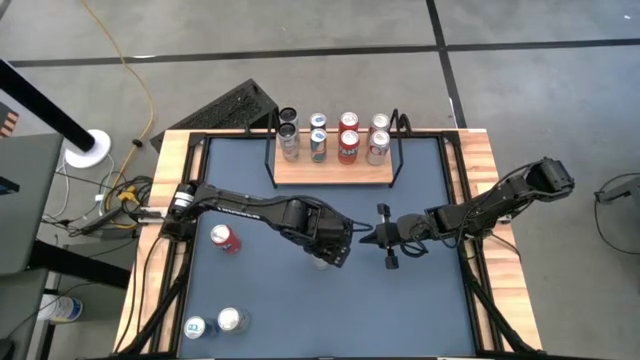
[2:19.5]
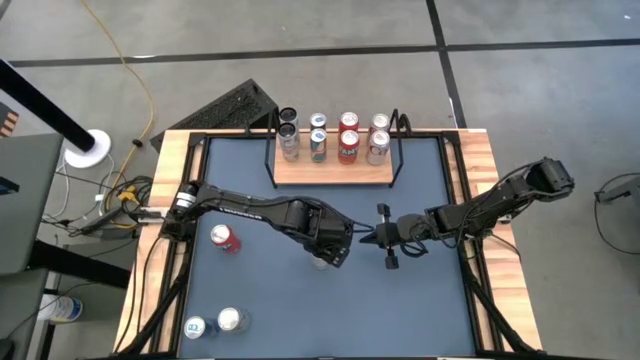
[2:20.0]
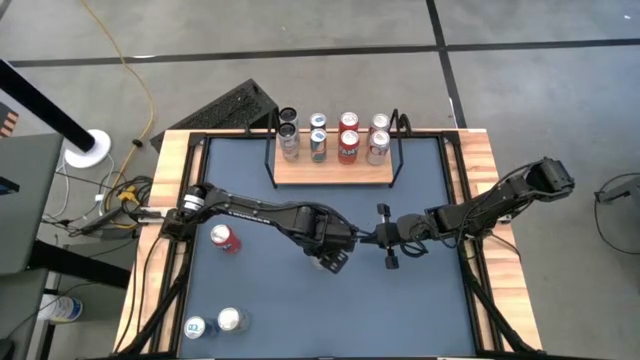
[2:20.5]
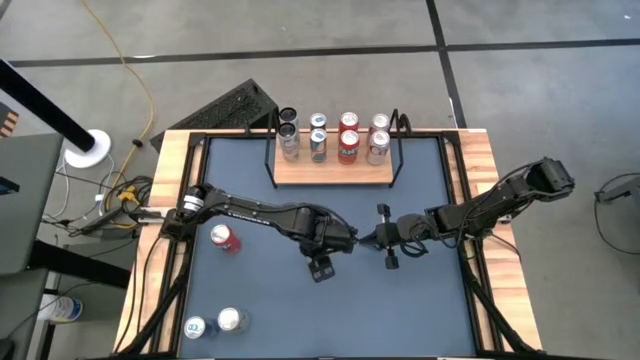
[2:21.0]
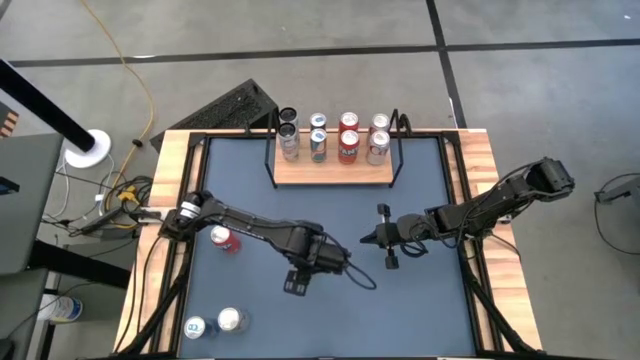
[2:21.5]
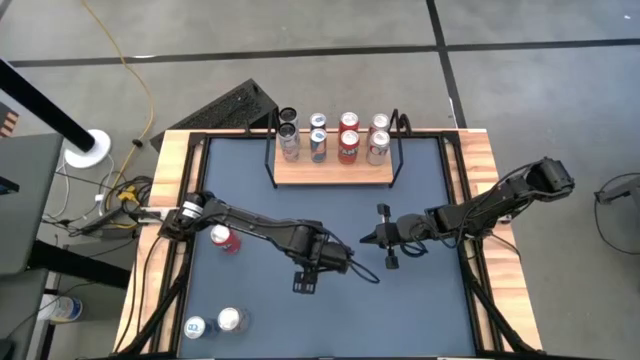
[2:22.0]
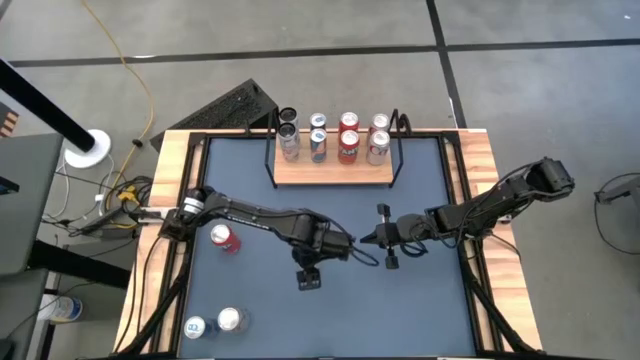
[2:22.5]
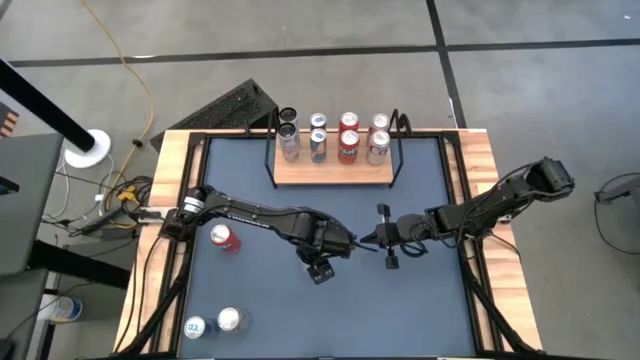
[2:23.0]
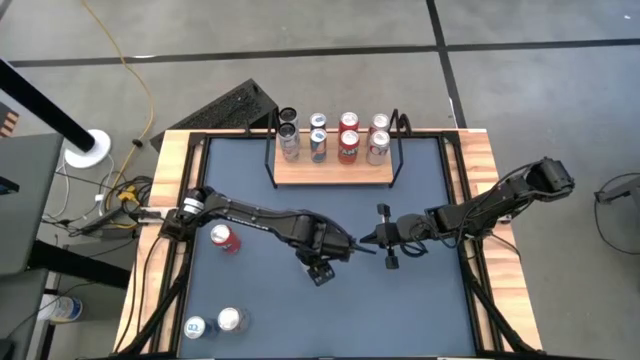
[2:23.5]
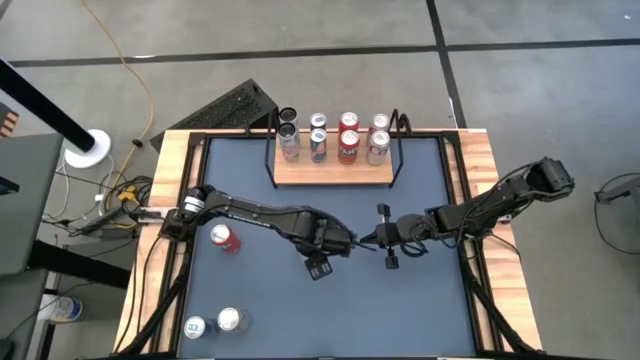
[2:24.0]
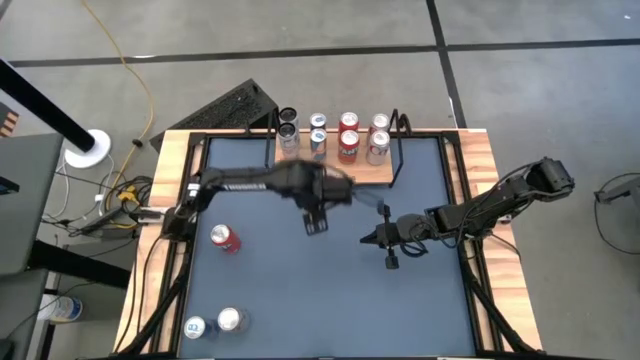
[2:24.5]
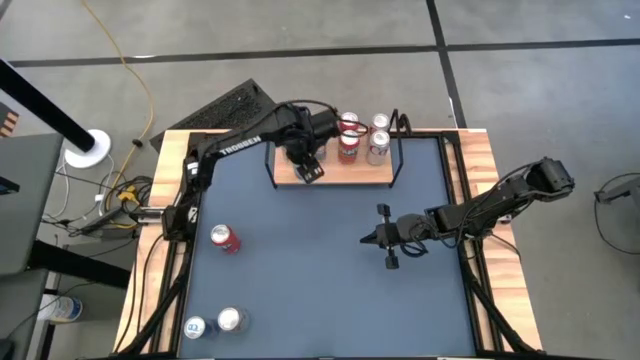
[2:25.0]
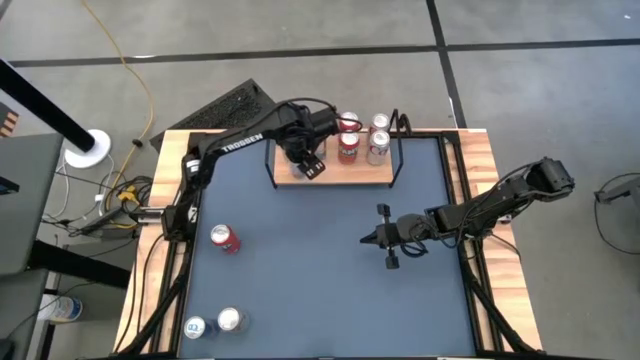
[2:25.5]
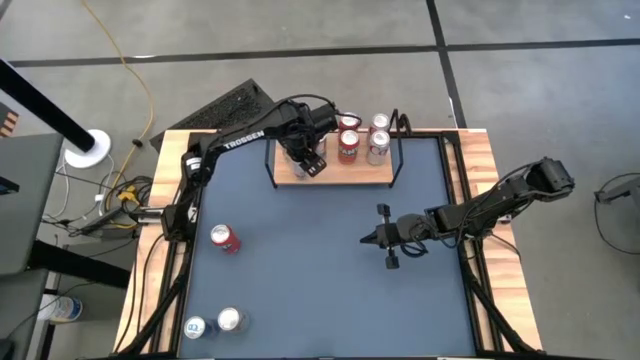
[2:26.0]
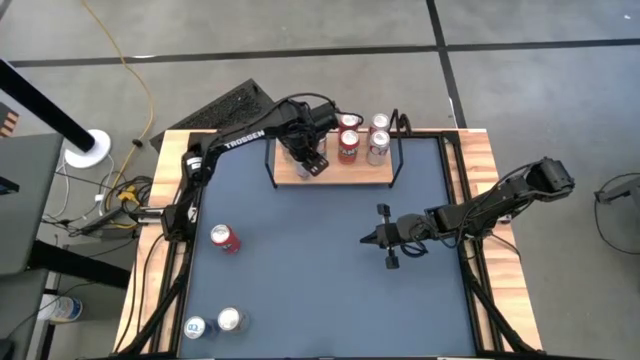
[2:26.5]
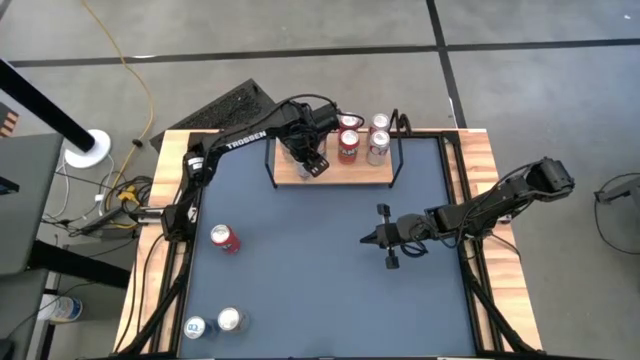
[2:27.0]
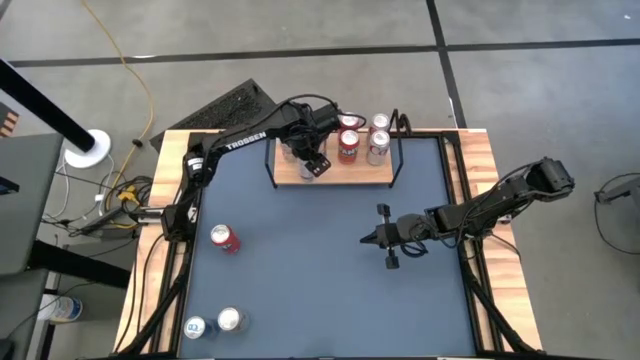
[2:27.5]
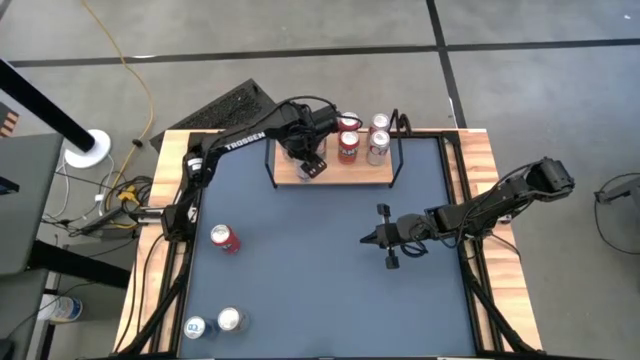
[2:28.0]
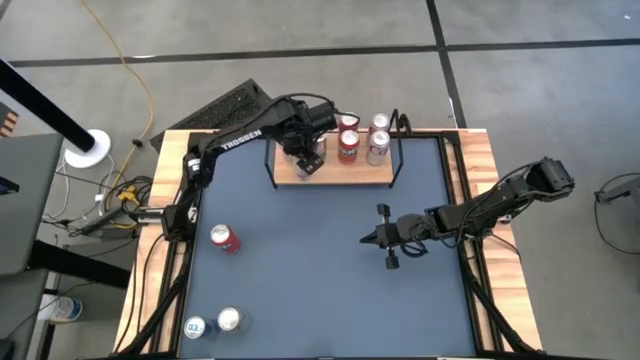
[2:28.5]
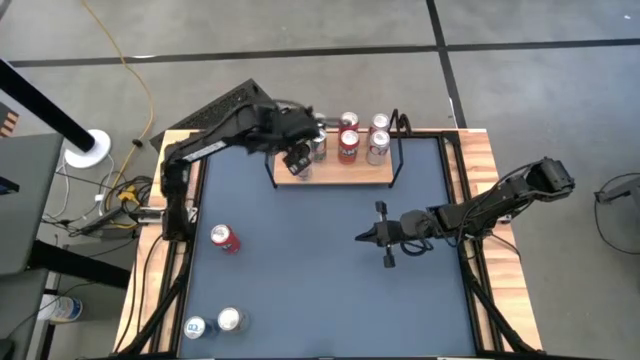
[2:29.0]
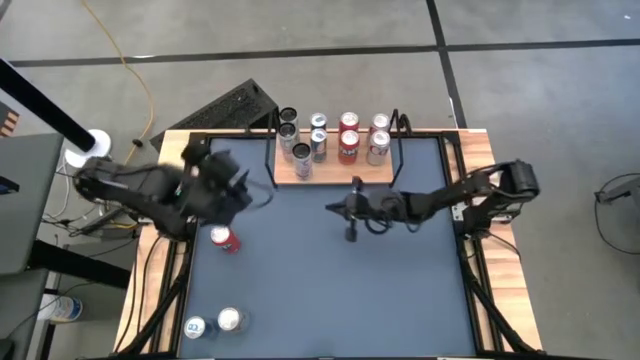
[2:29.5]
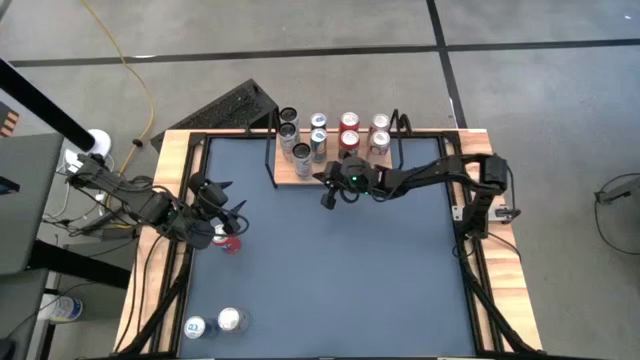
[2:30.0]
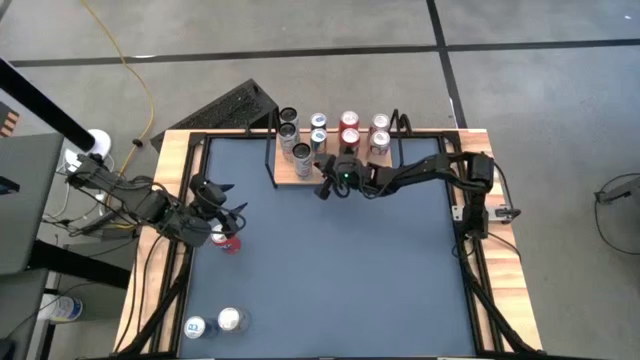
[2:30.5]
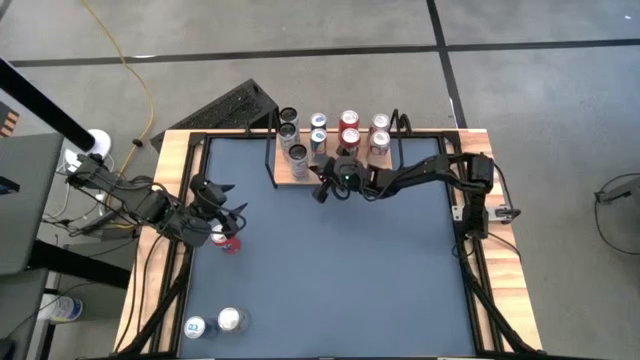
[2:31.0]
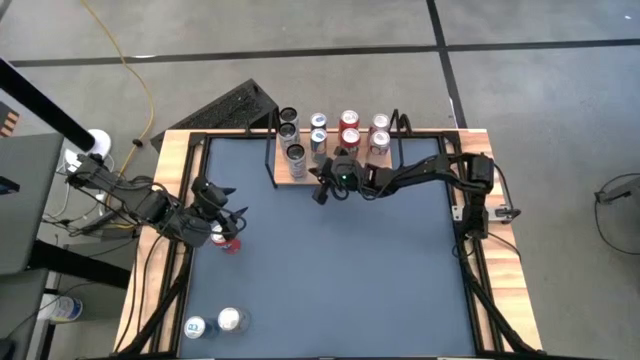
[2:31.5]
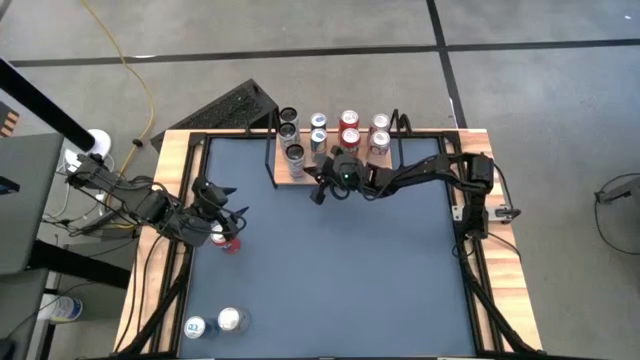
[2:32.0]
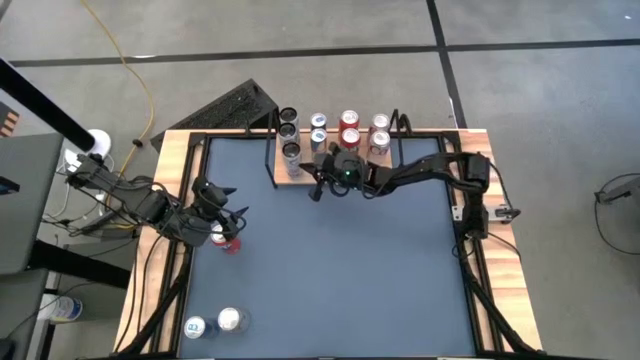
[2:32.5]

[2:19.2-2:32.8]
Task: Place canned beverage on shelf
Put the white soda can on the shelf aligned with the other white soda can

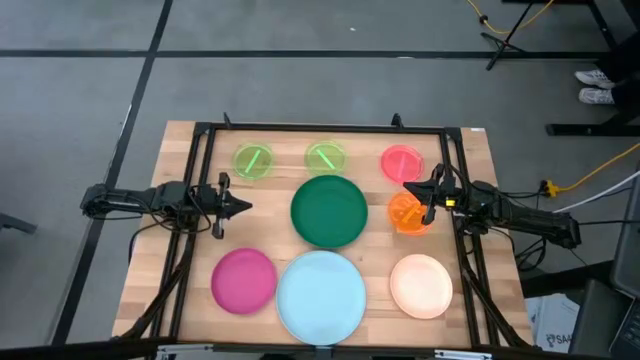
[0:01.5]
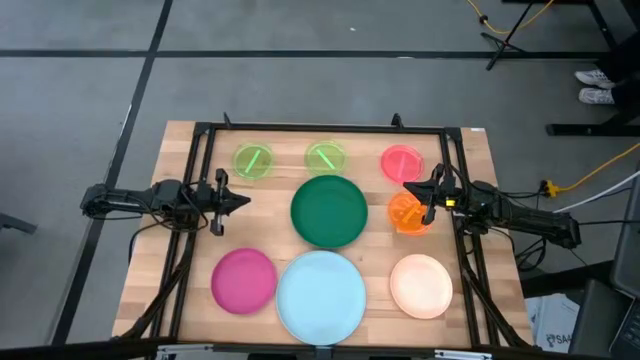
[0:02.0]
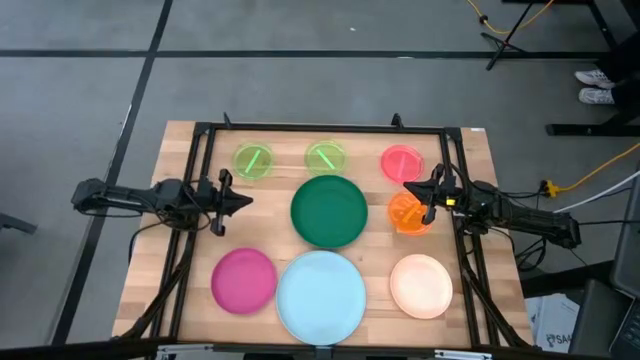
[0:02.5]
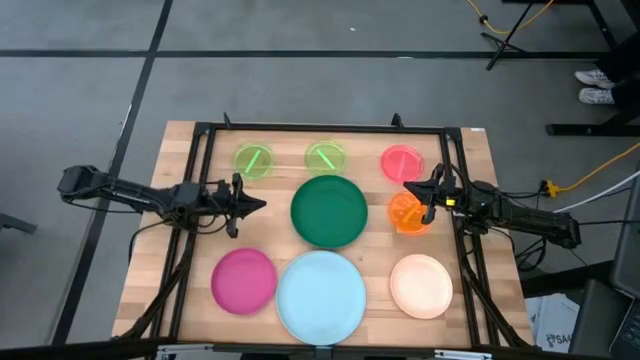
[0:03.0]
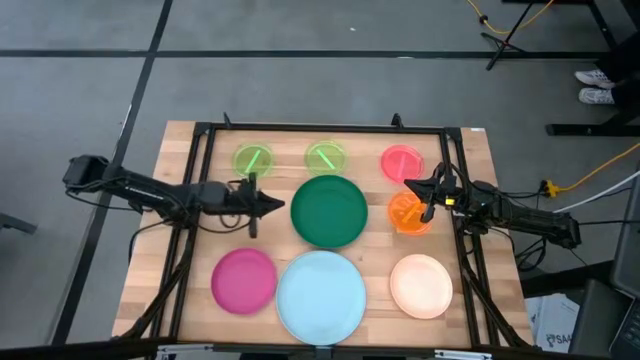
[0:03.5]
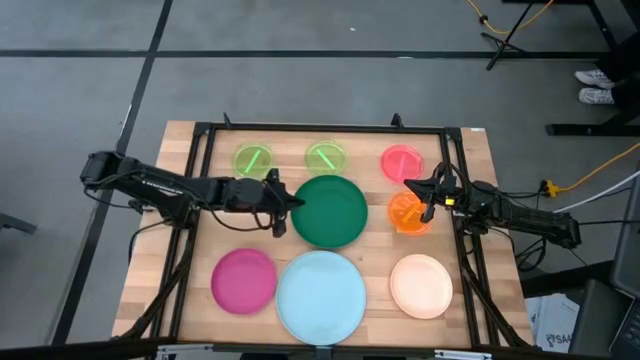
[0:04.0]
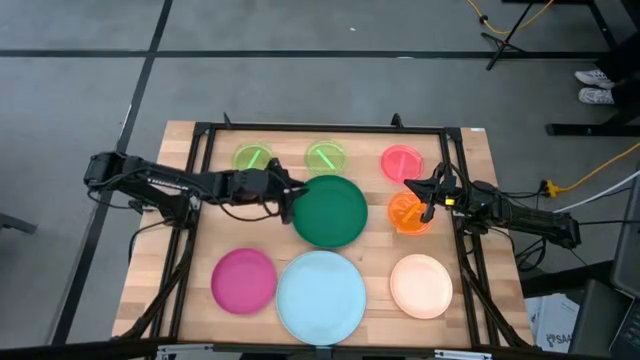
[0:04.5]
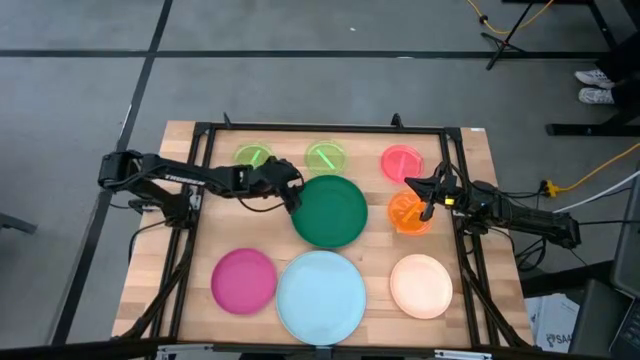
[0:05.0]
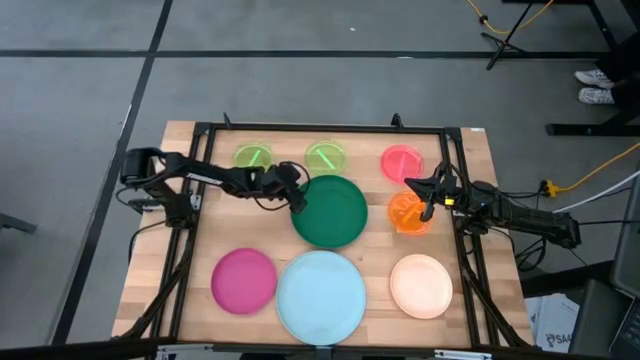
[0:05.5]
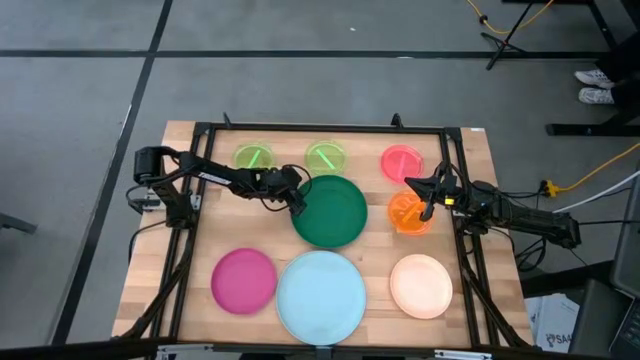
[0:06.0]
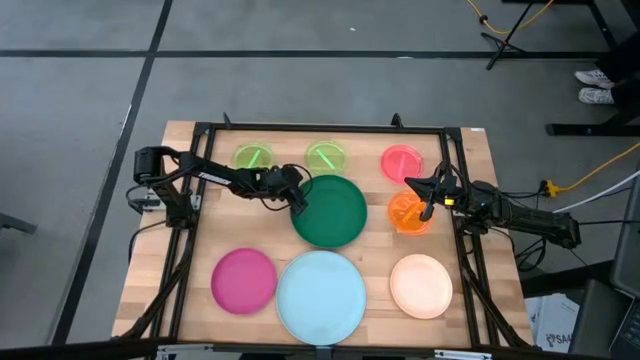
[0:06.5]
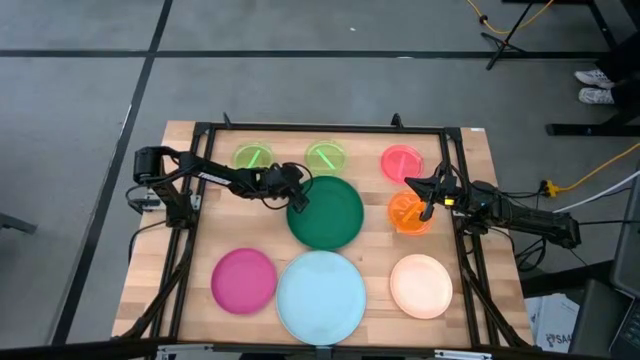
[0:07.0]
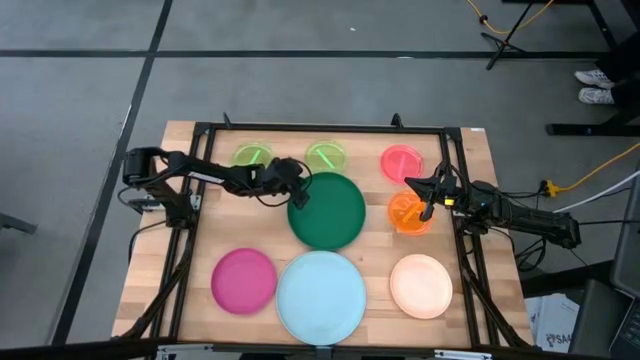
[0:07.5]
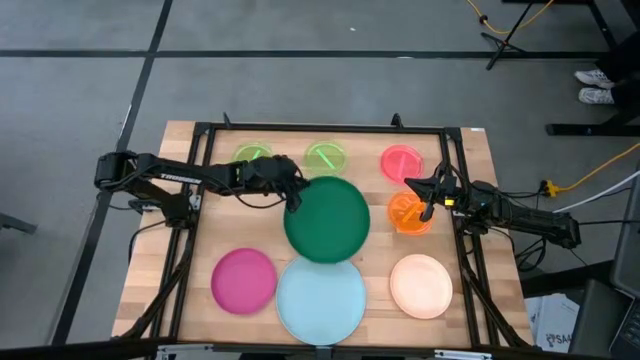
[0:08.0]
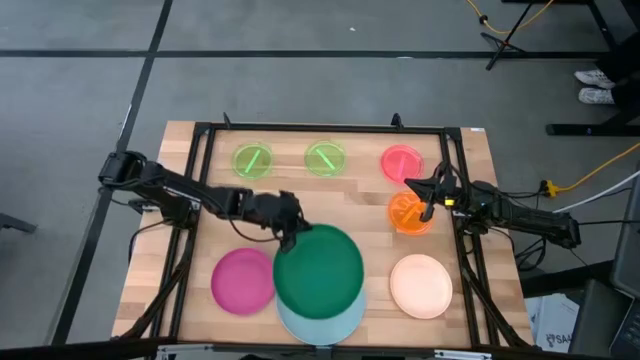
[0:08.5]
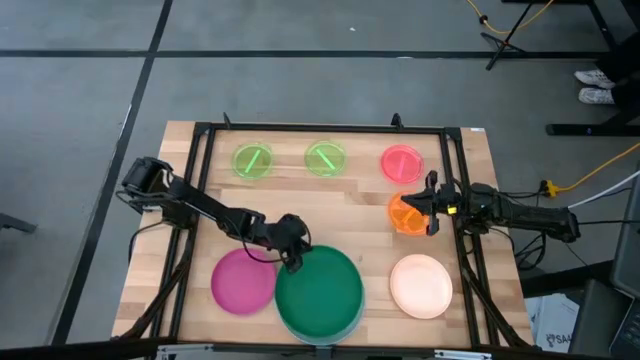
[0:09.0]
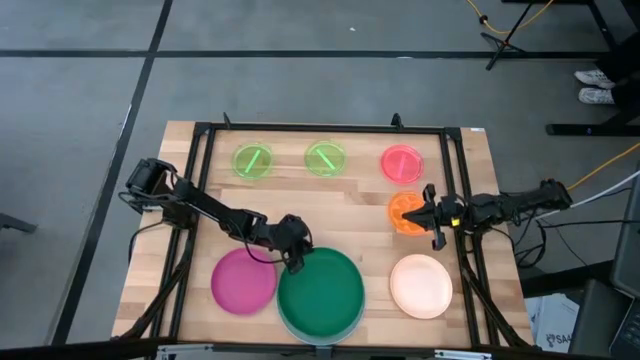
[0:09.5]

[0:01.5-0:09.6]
Task: Stack plastic plates
Stack the green plate on top of the blue plate
